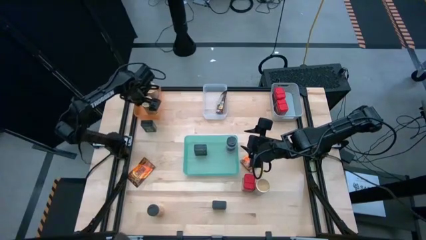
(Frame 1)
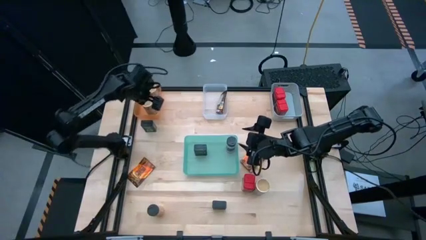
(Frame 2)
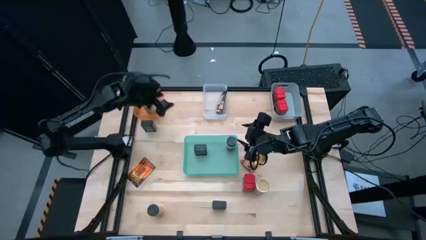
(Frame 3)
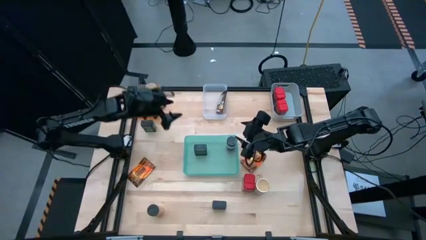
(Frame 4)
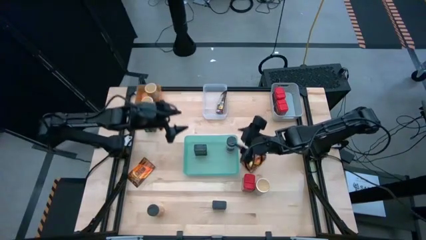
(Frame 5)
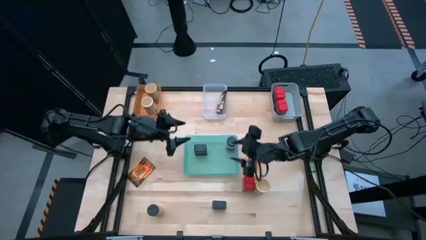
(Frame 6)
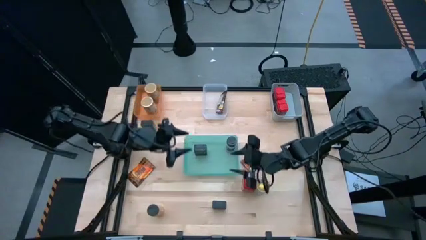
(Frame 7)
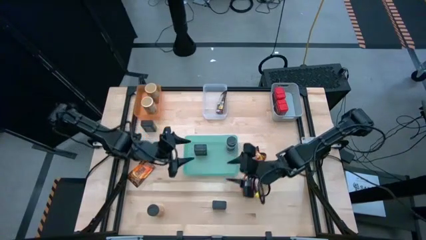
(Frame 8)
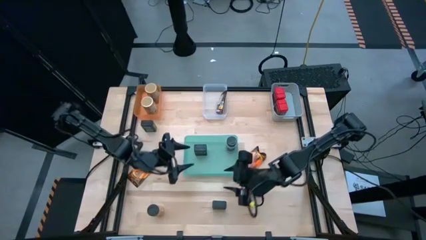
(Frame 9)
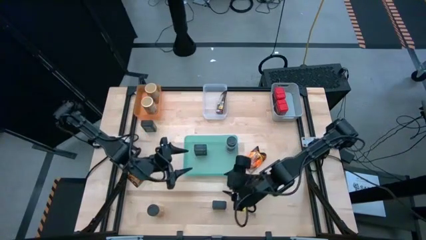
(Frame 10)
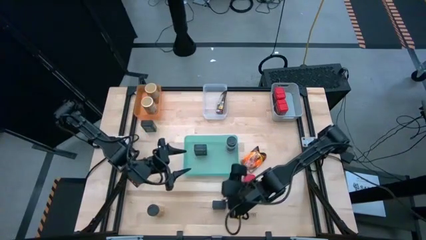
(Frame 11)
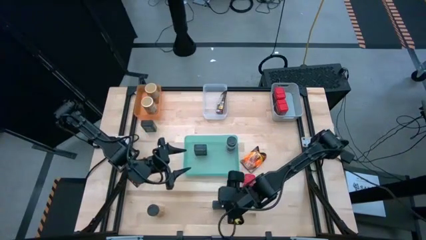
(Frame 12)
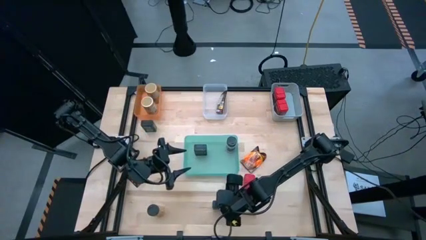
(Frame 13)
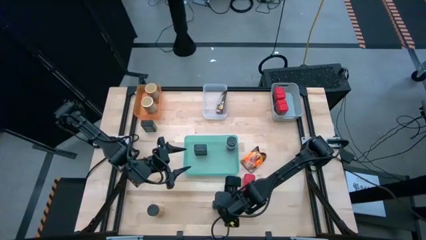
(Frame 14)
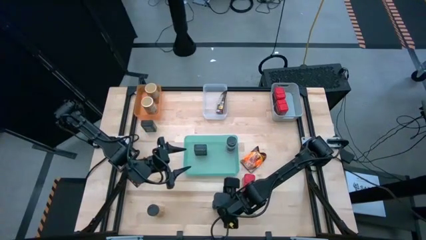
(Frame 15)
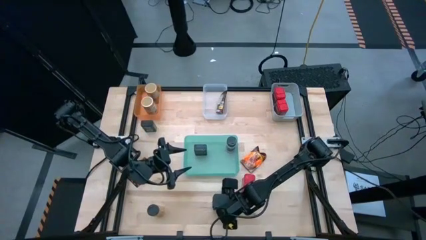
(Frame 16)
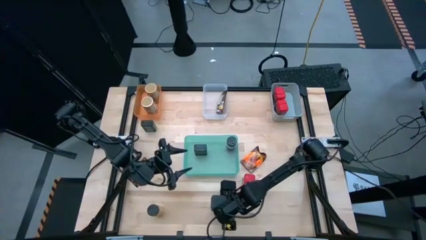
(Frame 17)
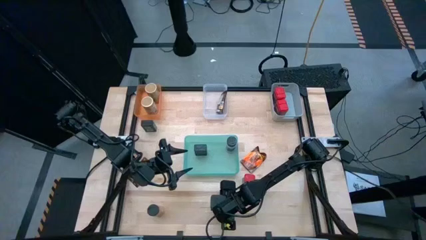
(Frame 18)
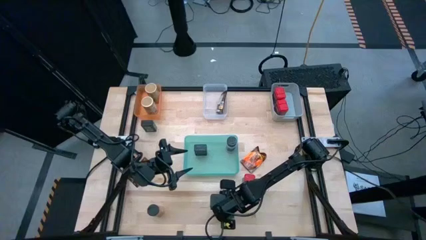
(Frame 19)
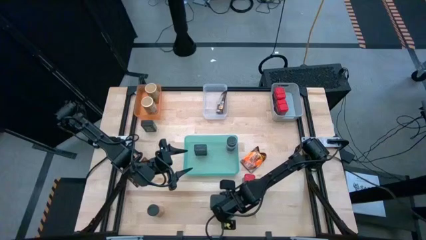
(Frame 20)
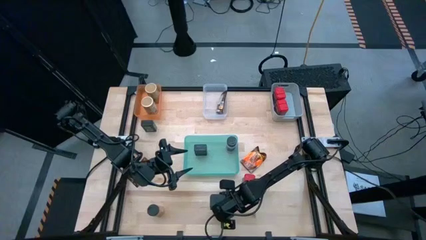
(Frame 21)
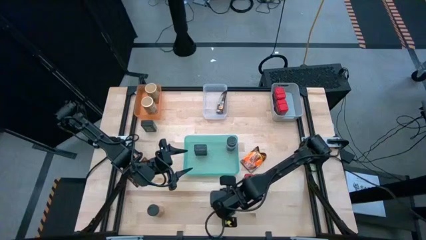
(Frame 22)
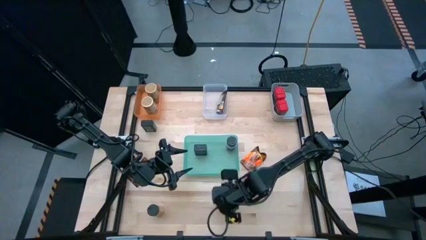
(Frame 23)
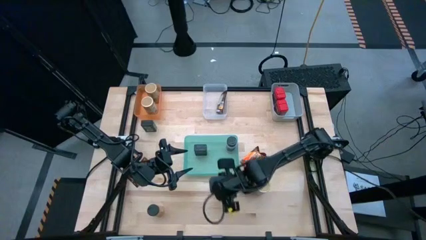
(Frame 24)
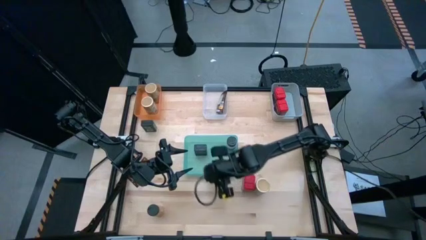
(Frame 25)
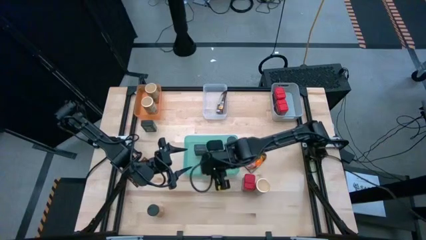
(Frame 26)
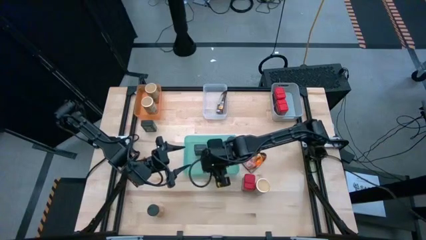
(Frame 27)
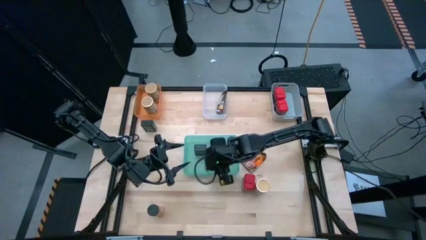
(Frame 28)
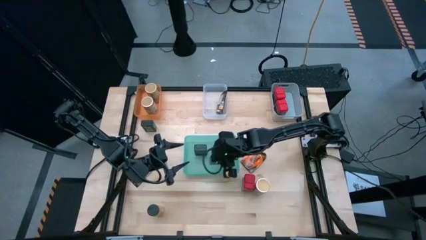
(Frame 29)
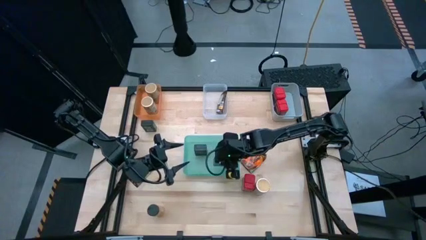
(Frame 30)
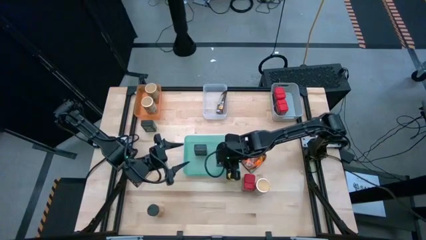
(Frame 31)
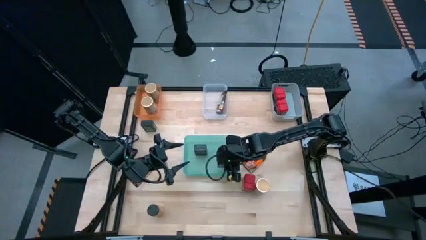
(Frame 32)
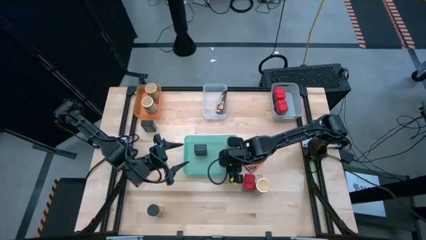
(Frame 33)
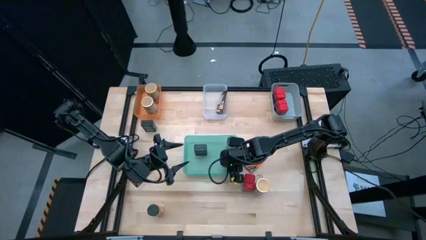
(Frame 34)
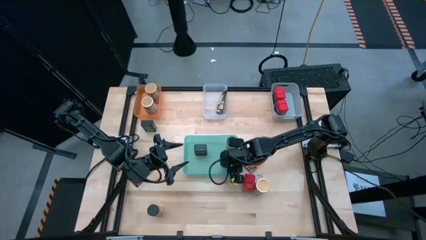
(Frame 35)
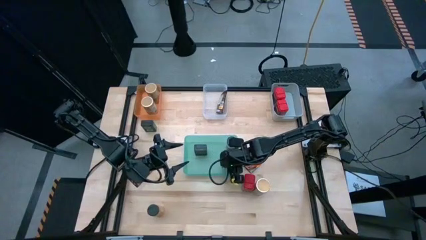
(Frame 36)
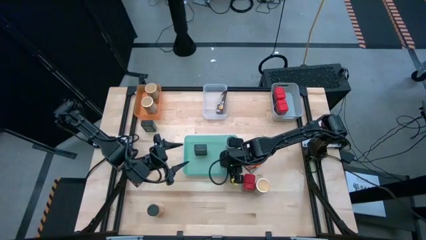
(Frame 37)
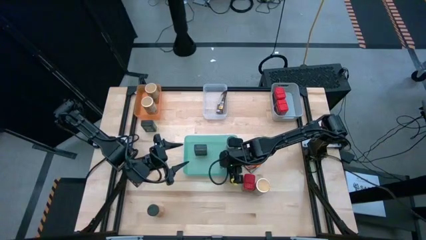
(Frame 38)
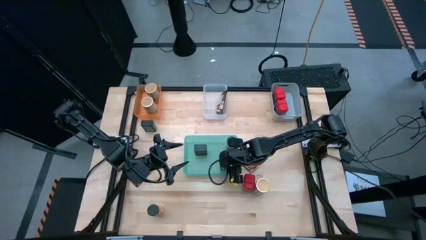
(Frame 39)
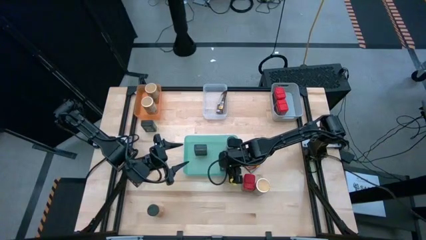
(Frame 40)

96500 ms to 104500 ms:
Task: Sort spices by type
Put the bottom black spice can into the green bin

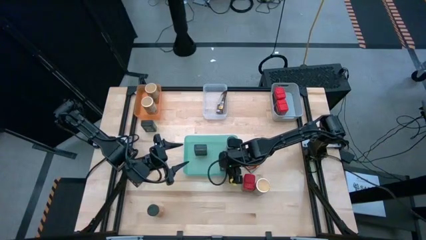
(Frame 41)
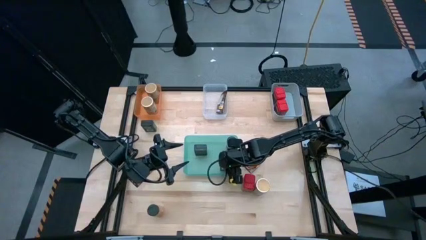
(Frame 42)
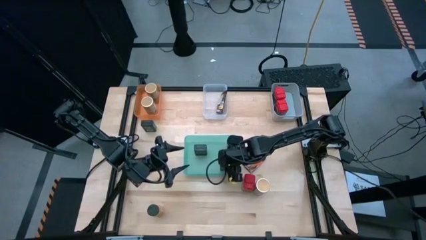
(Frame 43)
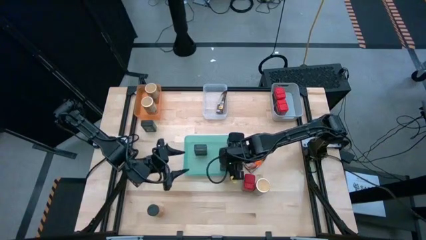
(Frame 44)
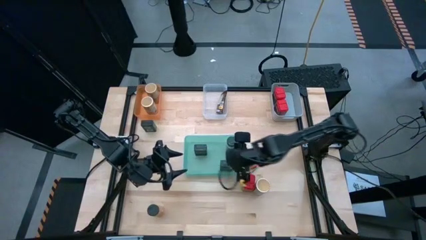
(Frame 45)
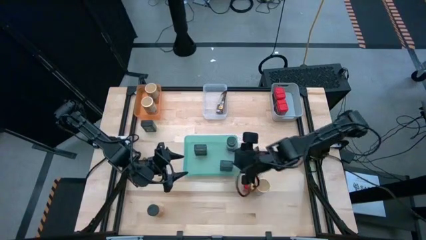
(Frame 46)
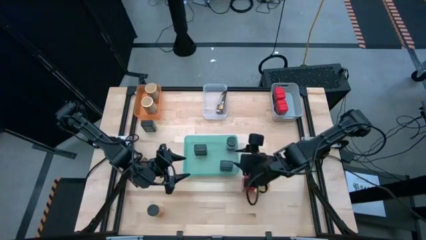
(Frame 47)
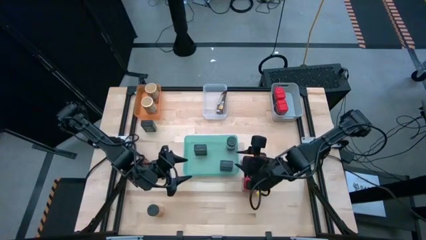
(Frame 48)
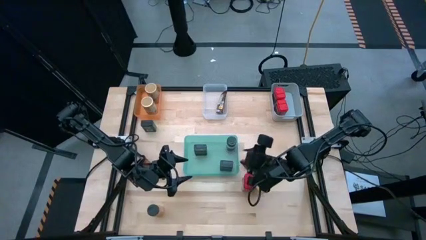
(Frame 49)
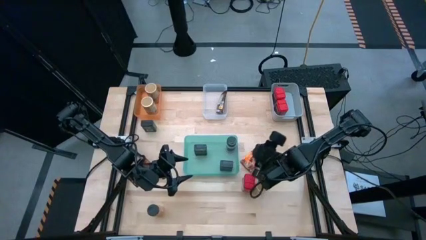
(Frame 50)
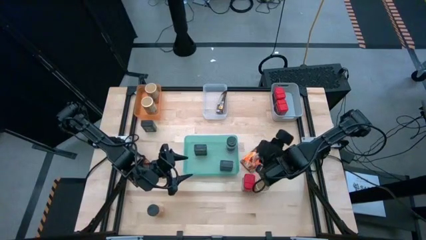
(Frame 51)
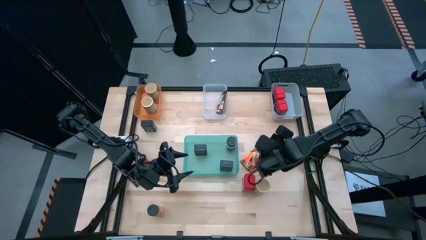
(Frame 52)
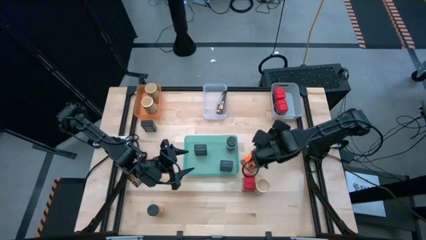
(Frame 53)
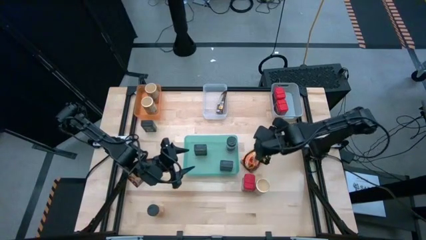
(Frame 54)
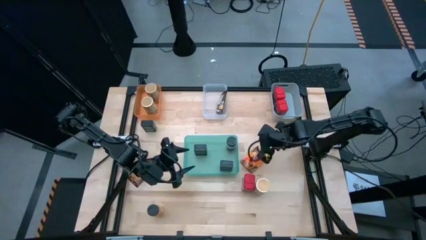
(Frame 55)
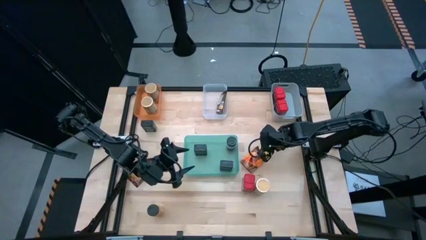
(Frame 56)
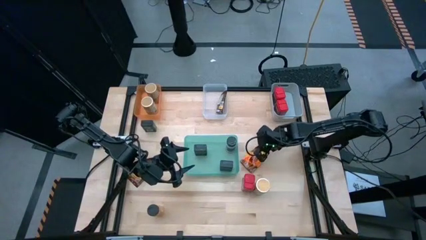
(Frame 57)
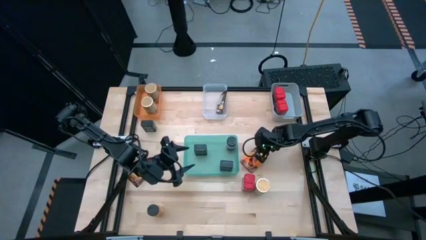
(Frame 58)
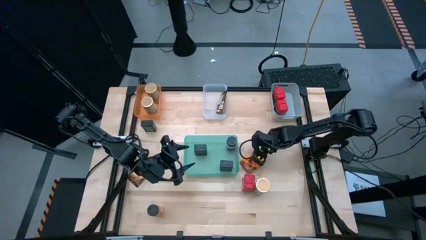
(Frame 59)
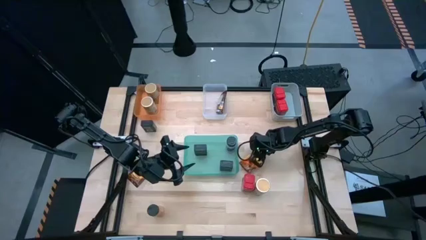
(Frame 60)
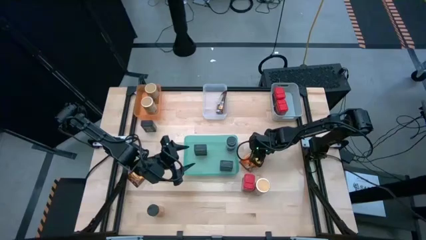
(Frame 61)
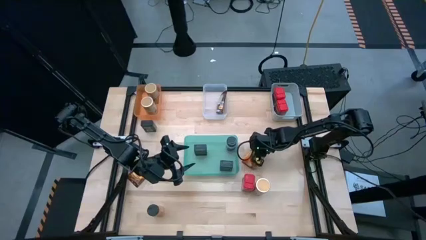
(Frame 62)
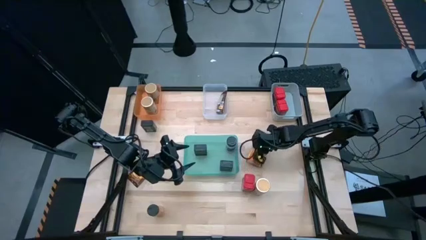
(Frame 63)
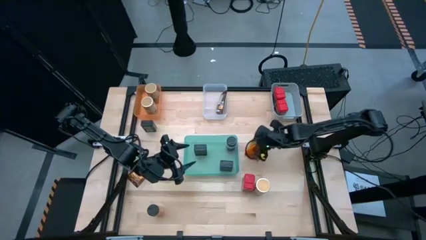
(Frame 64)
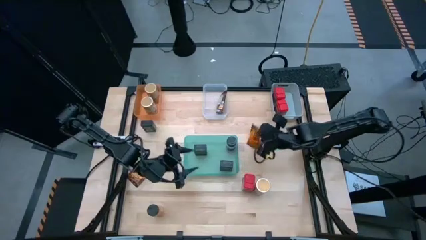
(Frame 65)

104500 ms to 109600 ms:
Put the right orange spice pack into the transparent bin

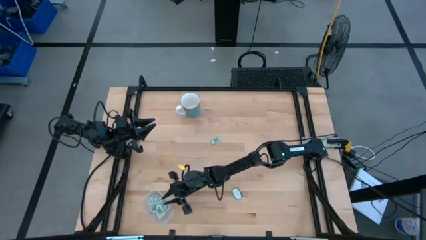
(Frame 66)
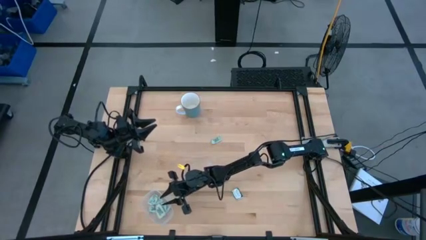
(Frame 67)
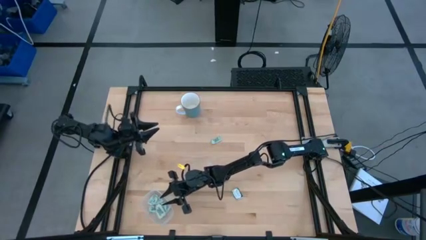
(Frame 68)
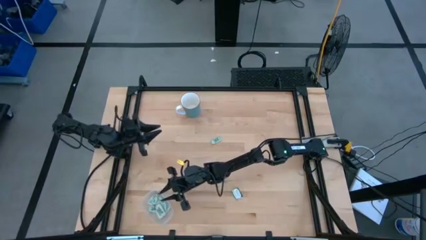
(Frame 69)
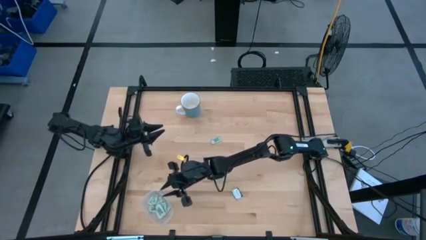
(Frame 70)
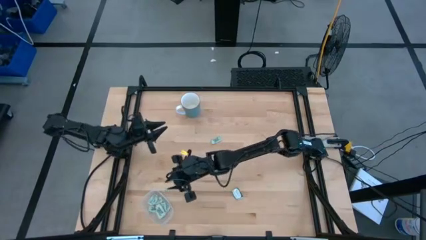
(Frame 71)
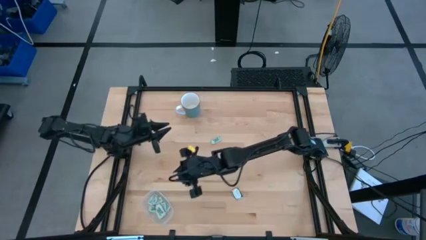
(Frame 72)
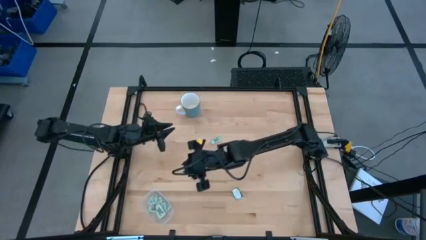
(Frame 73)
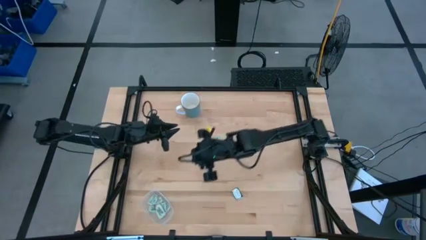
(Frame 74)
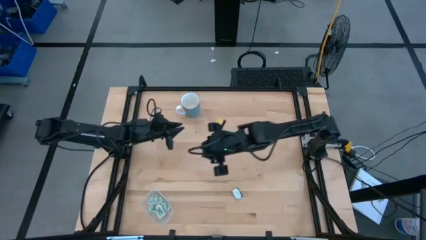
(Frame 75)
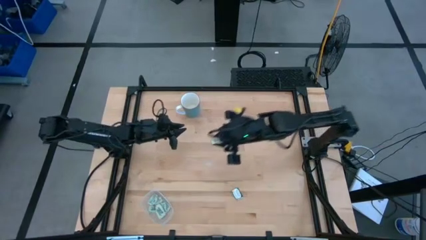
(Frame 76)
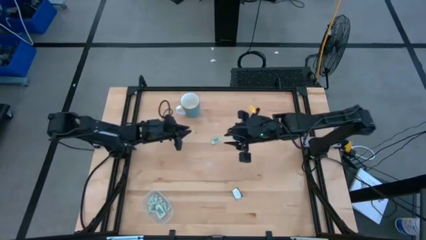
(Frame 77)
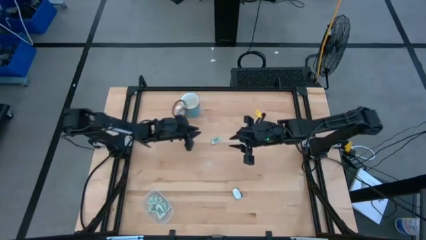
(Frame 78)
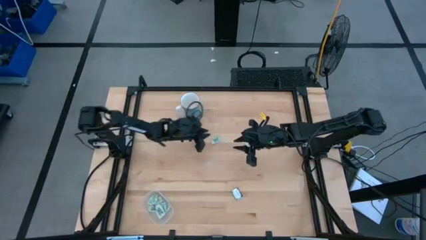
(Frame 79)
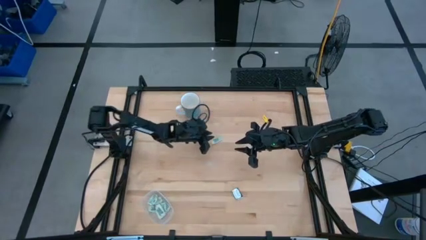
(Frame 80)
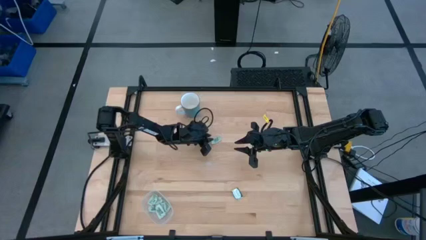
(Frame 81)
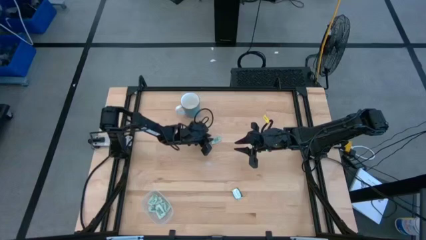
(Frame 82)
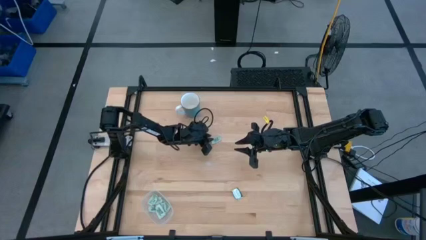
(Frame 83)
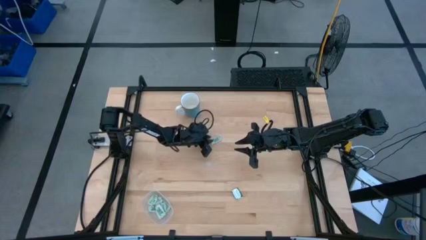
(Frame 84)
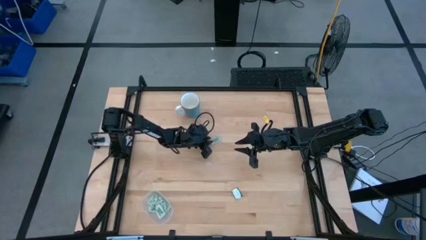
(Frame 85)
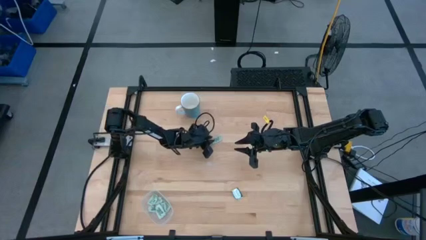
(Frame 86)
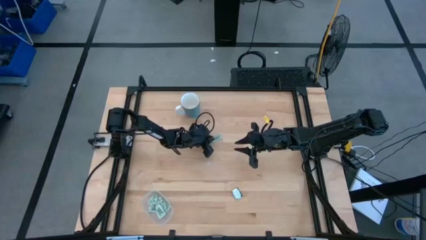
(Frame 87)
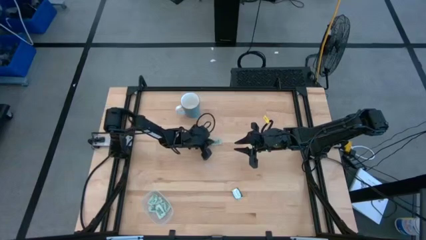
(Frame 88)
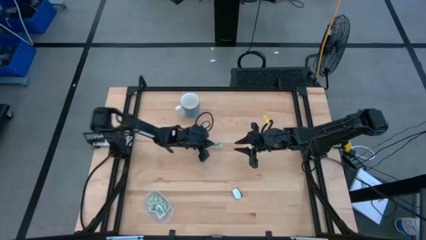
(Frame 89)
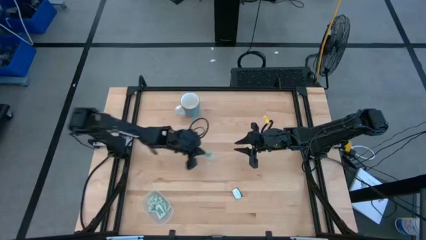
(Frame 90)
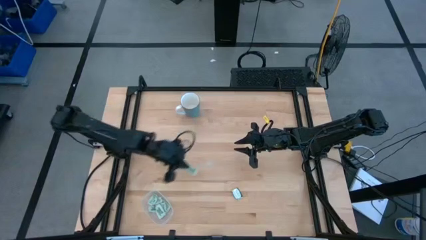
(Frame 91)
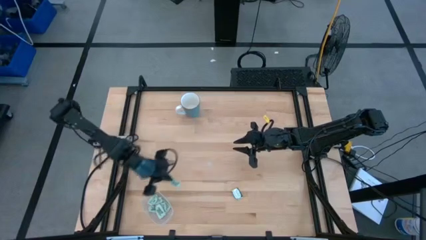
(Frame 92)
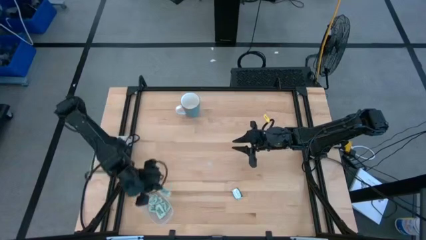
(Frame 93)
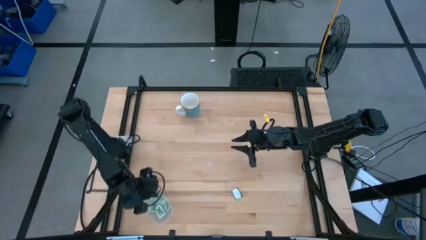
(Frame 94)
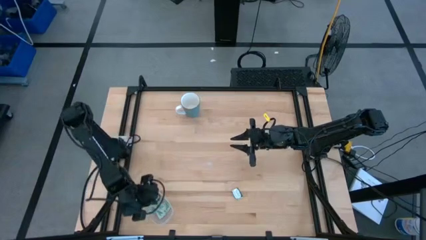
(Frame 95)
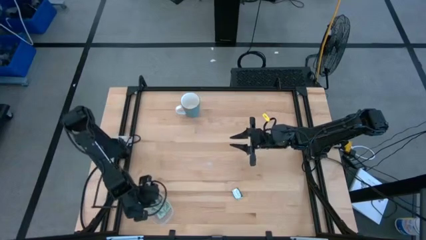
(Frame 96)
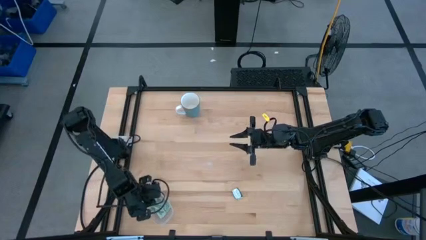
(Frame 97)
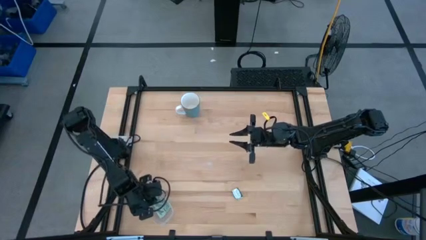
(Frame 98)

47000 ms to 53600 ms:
Task: Pick and place Stevia / Truvia into bins
Put the stevia packet into the transparent container
